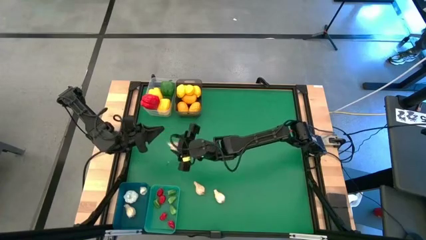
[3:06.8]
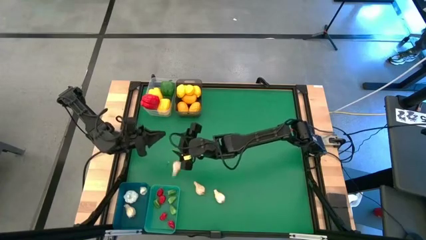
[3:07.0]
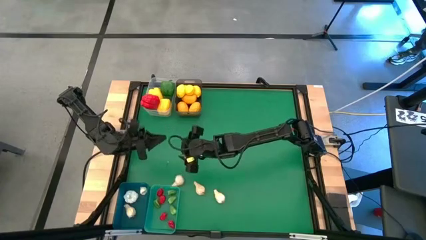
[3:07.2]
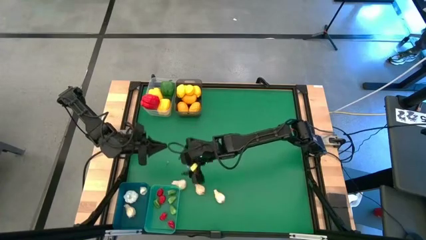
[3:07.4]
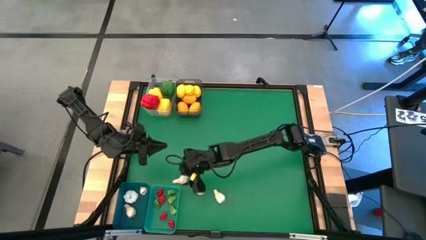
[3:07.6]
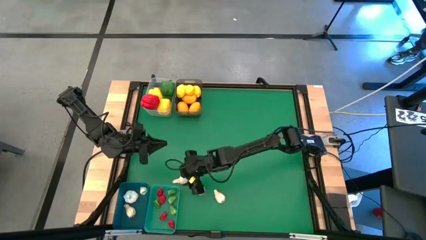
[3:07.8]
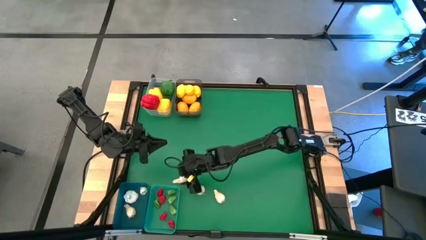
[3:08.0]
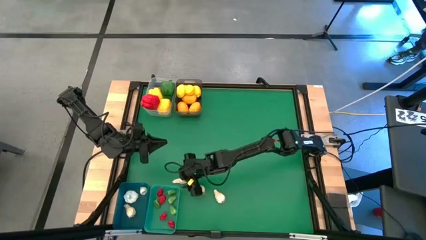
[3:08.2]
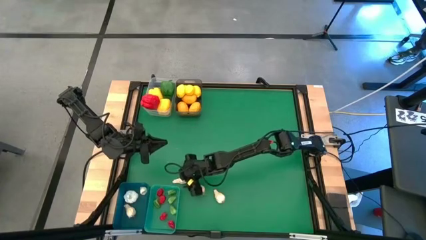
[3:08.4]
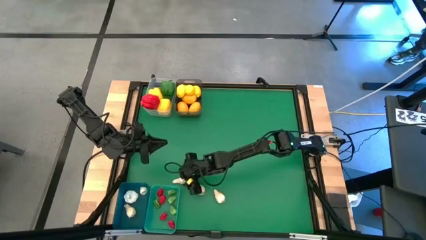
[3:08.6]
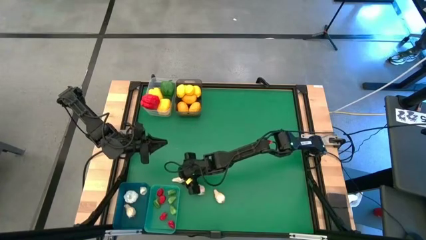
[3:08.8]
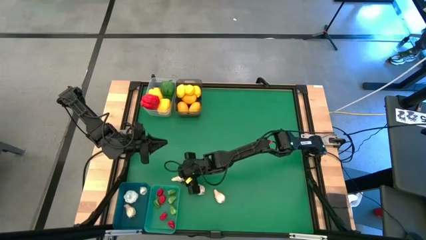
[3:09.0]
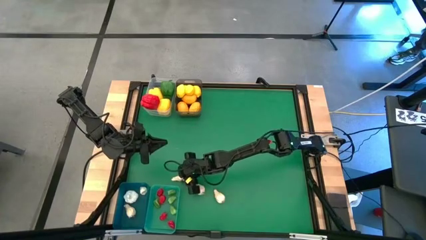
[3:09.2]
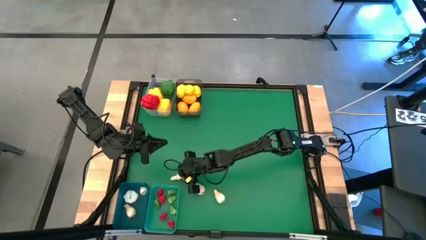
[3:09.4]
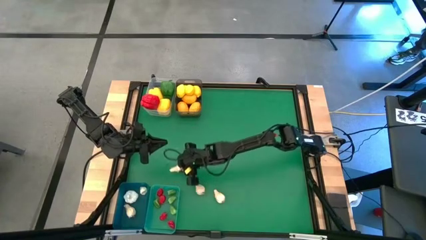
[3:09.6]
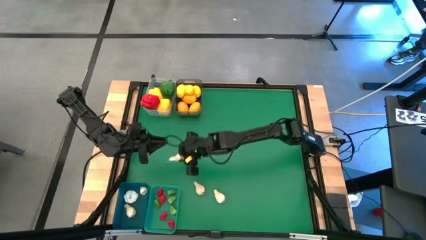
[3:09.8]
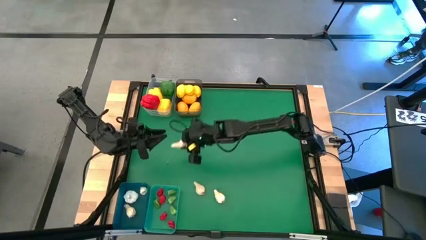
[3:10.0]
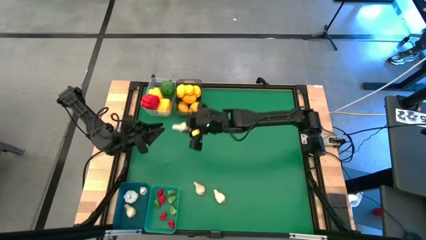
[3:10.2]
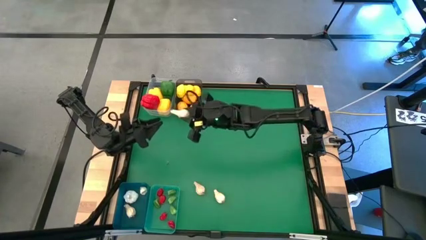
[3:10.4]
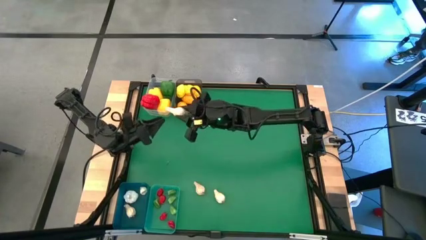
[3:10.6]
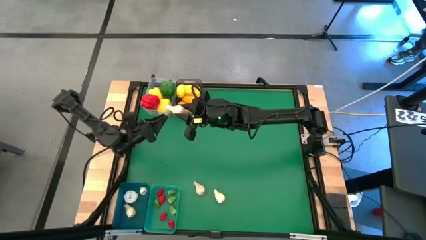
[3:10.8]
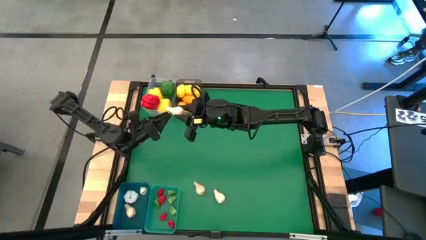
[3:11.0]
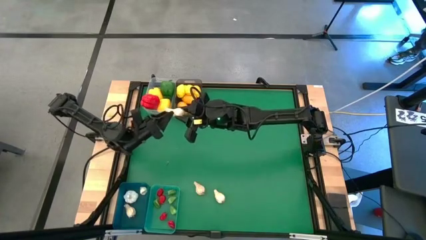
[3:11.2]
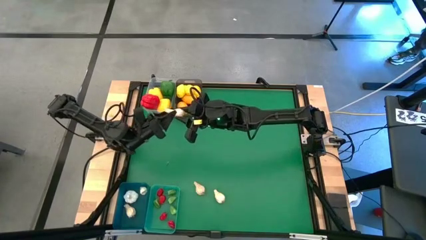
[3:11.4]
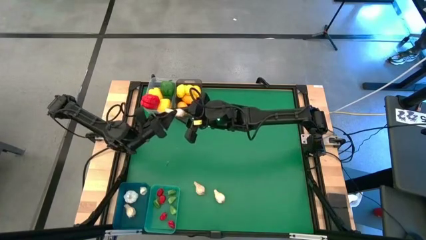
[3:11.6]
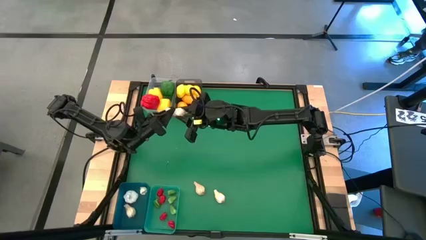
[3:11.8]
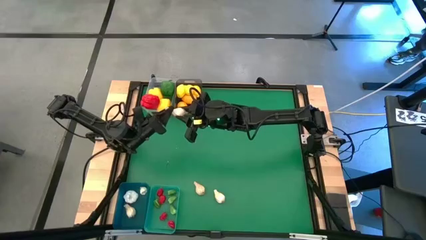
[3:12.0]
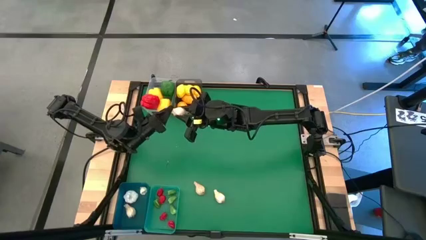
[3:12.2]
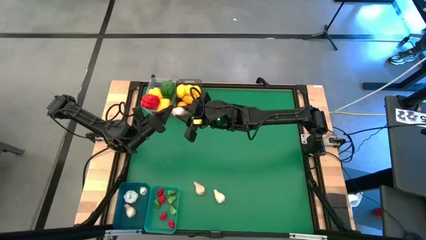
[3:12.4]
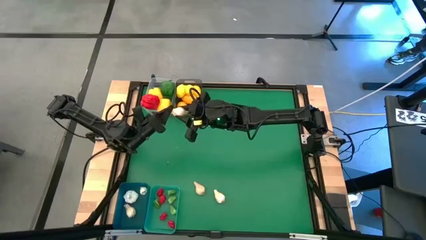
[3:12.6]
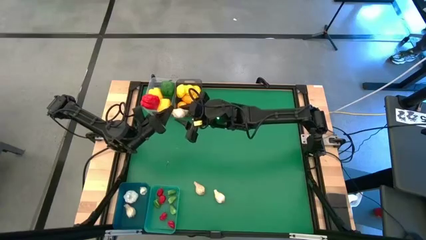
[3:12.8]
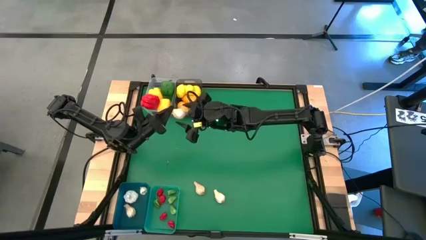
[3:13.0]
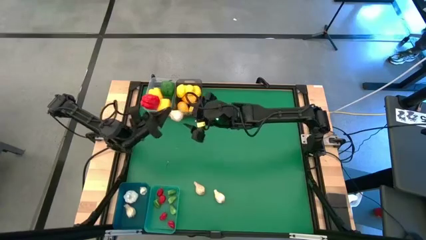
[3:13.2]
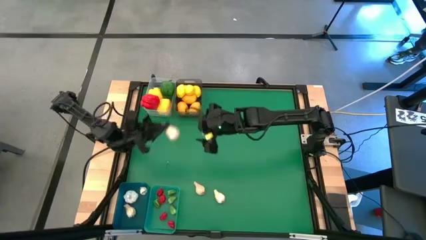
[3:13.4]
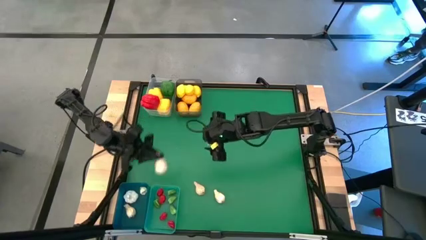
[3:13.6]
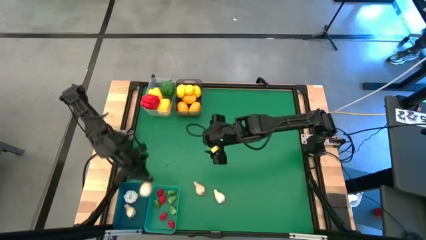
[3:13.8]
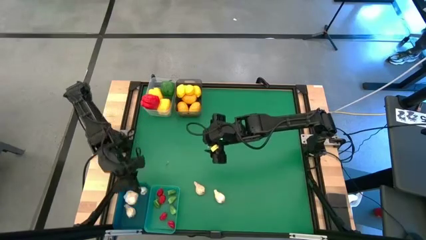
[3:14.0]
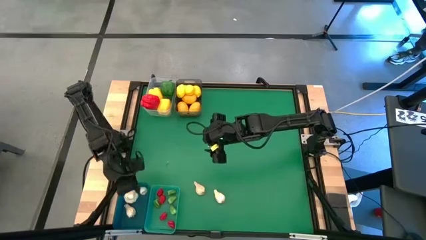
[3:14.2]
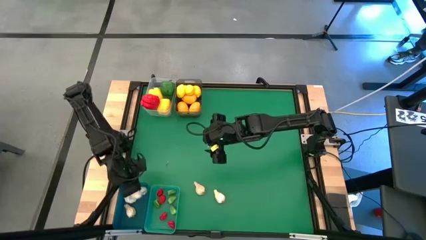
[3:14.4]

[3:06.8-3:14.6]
Task: Sort produce into baskets
Put the white garlic into the blue bin

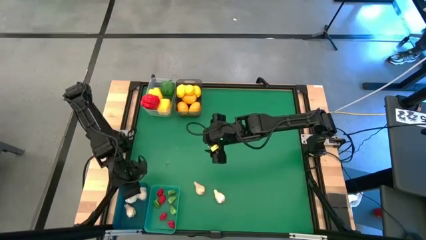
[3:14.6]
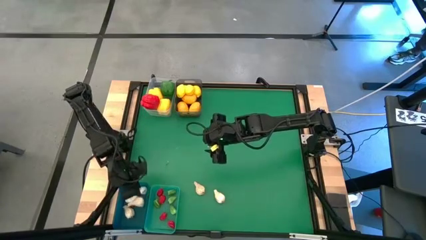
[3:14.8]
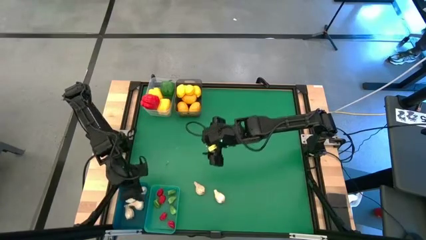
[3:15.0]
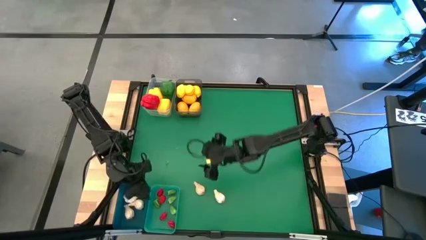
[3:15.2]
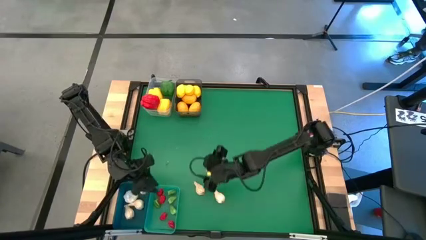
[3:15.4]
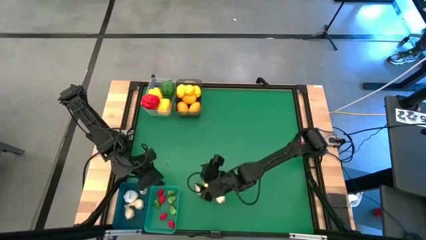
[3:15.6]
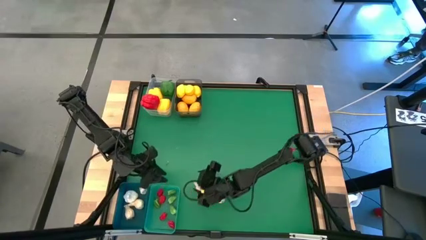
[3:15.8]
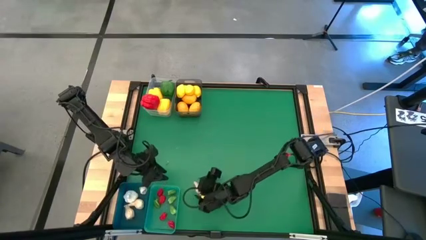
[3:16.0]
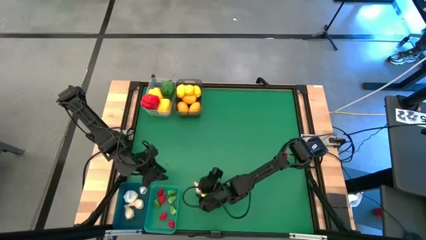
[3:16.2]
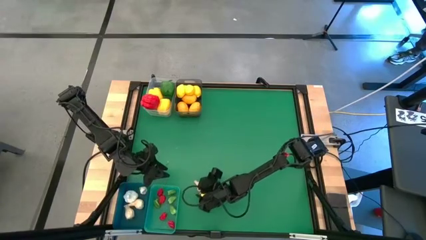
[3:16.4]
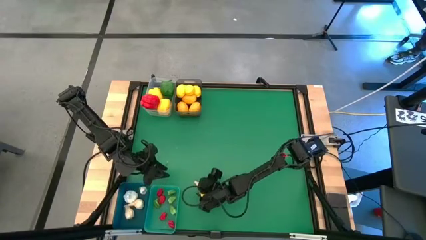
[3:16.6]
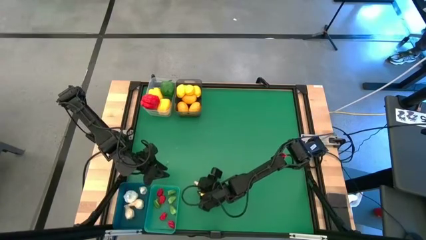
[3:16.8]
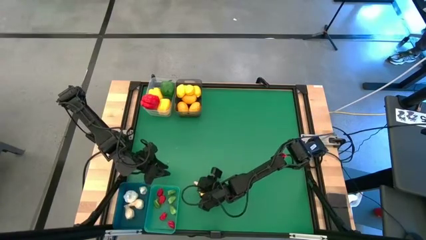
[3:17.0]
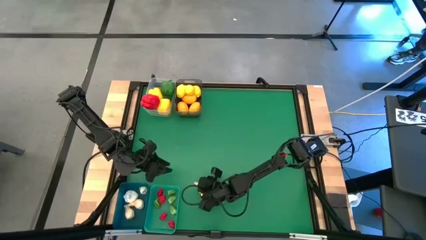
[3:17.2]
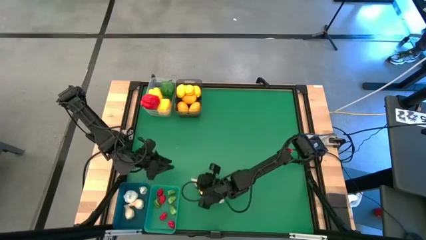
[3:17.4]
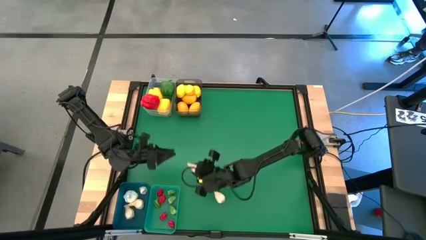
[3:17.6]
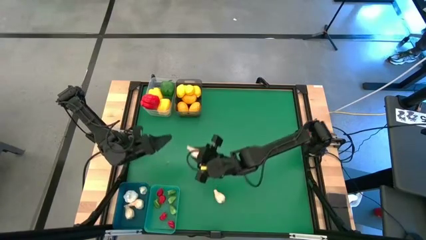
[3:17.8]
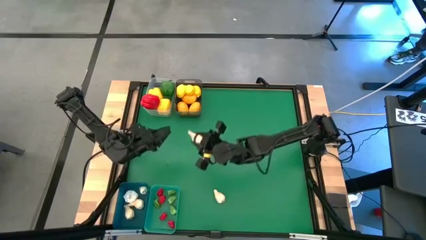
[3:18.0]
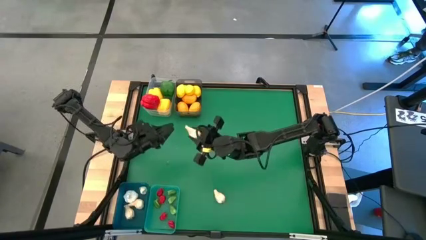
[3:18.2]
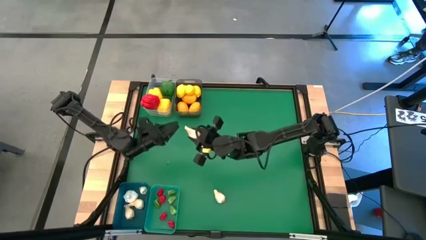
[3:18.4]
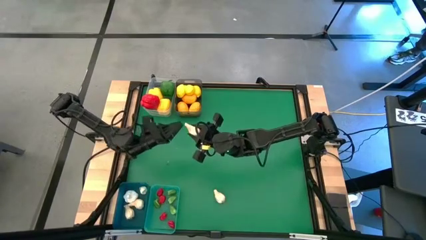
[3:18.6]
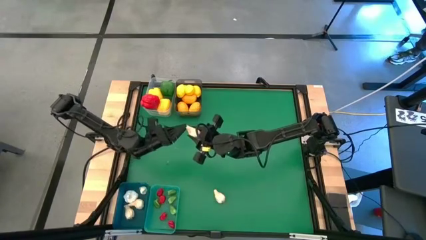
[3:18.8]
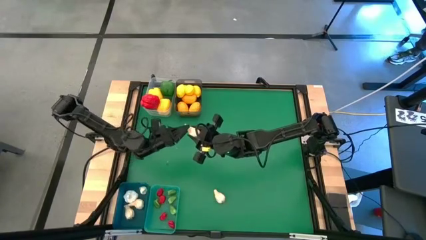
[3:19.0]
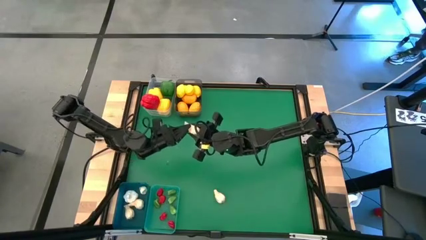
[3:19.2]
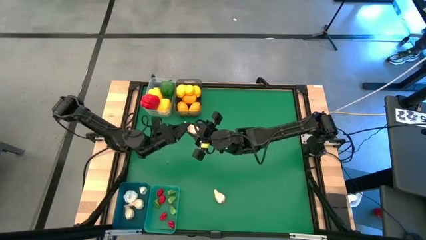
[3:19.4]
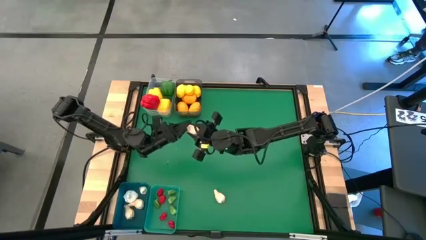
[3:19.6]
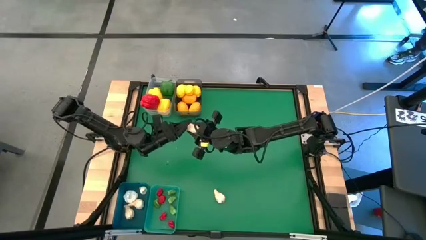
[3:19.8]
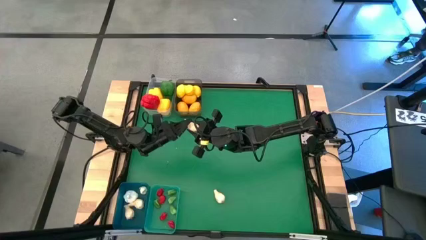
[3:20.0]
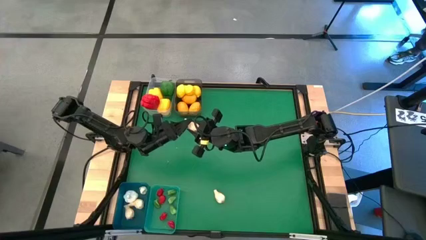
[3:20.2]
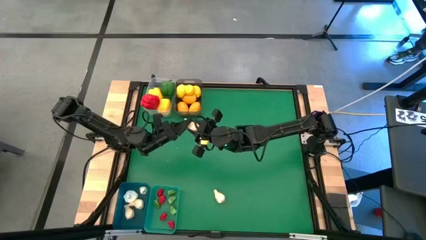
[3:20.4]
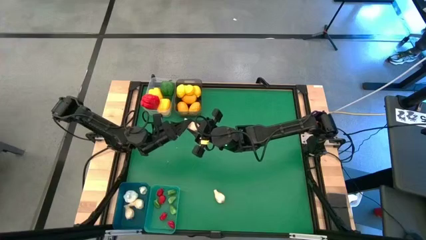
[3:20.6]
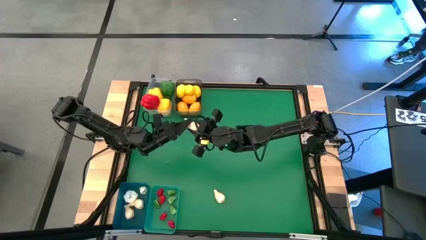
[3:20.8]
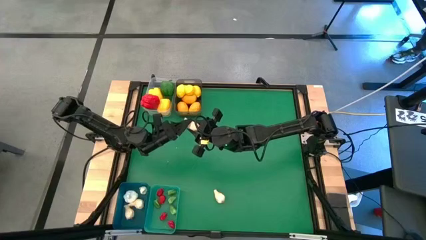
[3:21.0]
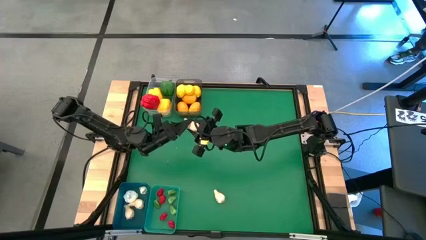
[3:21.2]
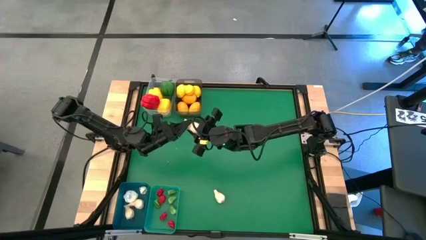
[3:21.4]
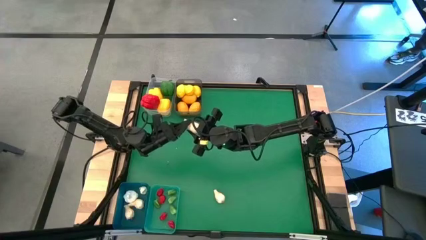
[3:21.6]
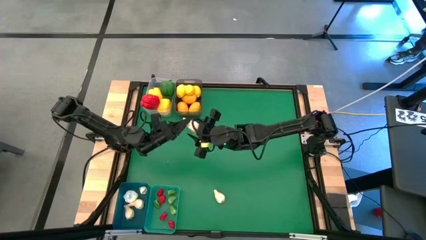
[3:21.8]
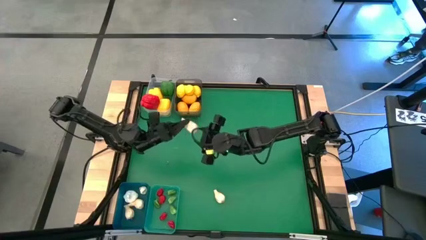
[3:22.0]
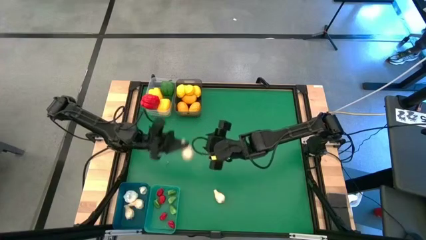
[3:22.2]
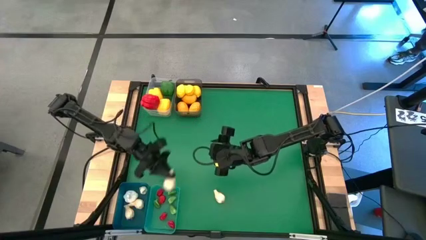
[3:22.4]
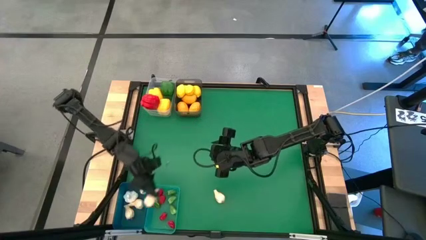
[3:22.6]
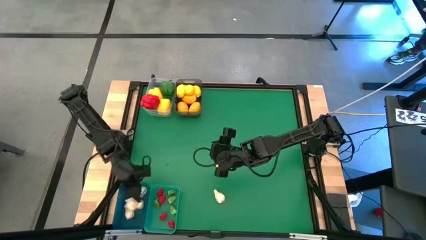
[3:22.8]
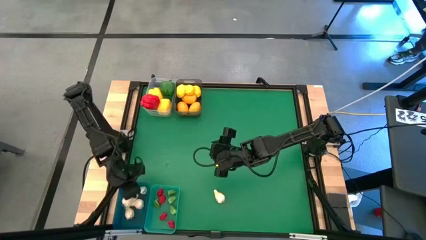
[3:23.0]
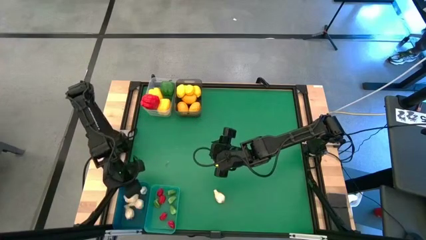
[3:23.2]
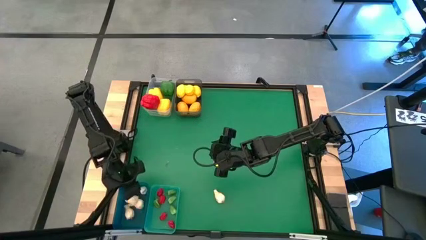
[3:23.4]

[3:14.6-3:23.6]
Put the white garlic into the blue bin
